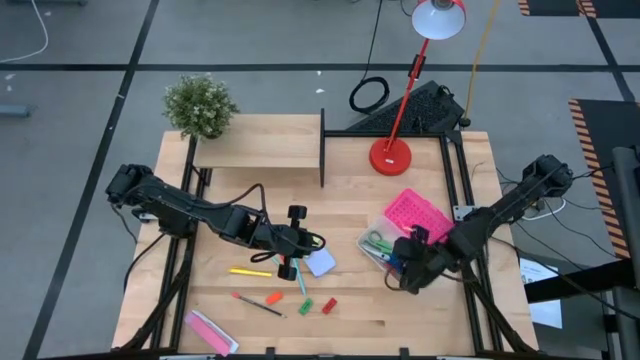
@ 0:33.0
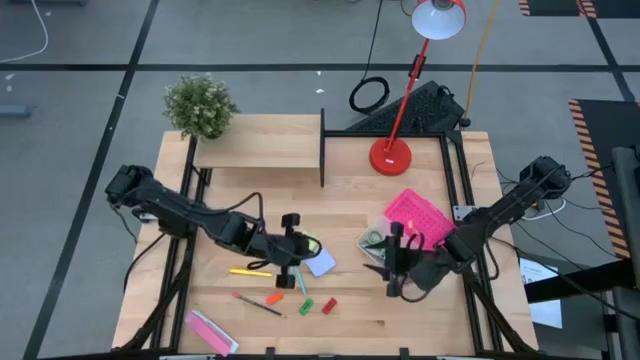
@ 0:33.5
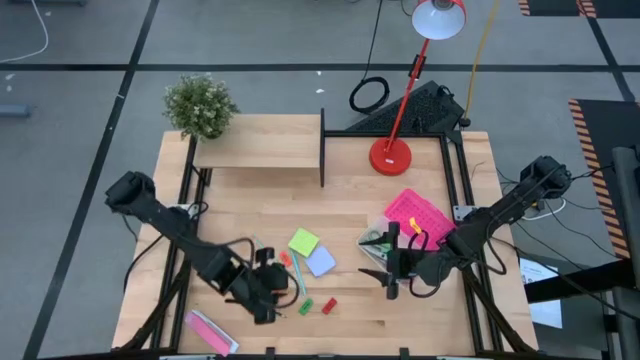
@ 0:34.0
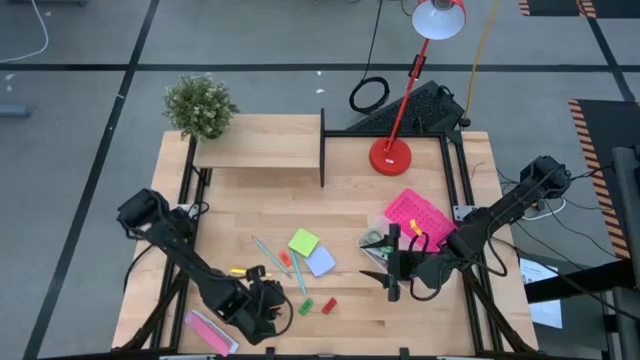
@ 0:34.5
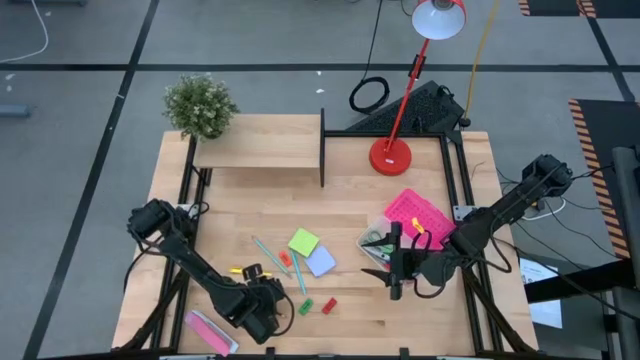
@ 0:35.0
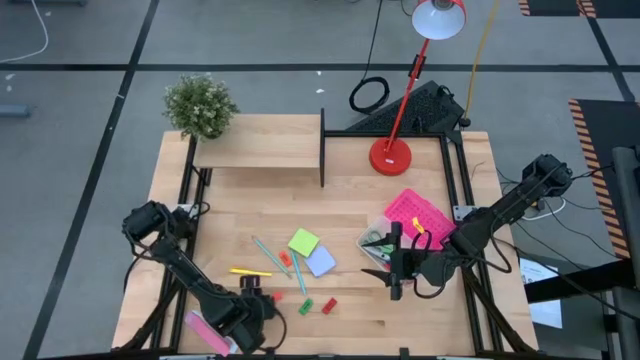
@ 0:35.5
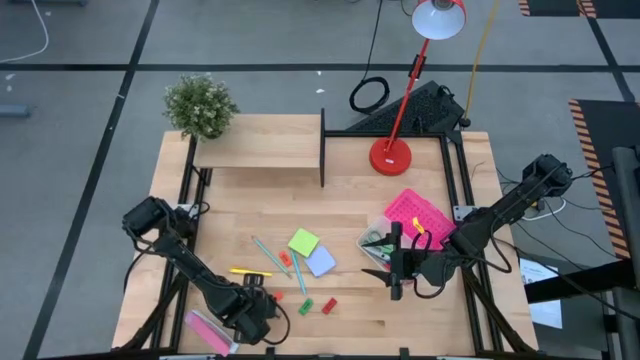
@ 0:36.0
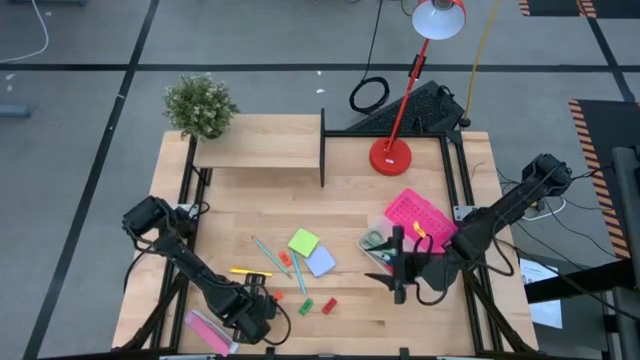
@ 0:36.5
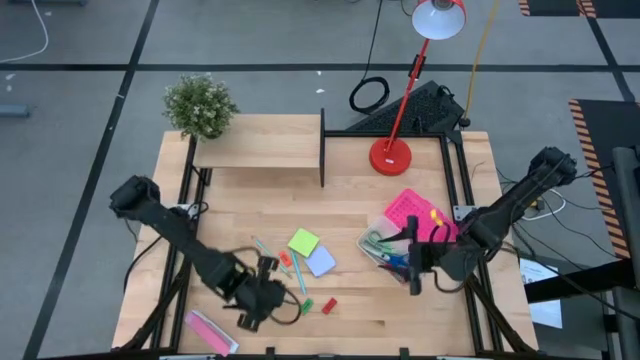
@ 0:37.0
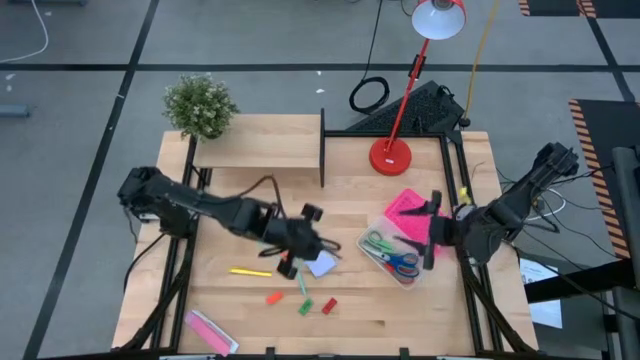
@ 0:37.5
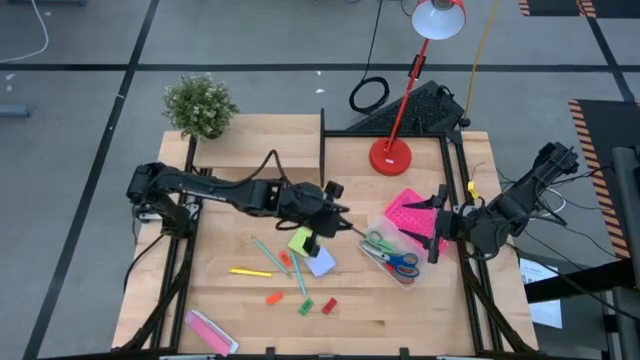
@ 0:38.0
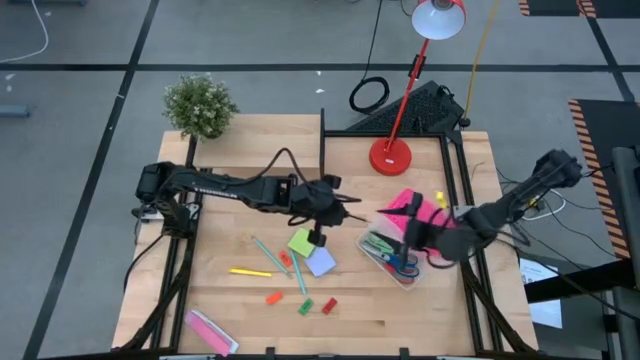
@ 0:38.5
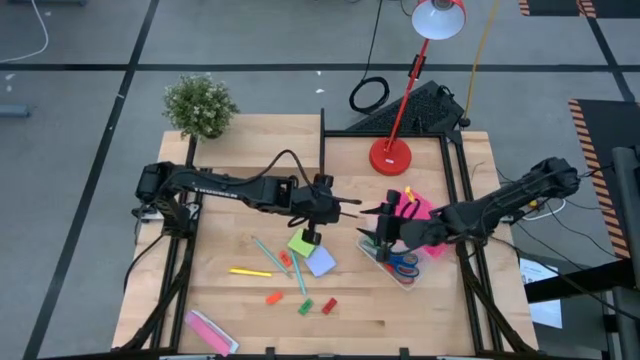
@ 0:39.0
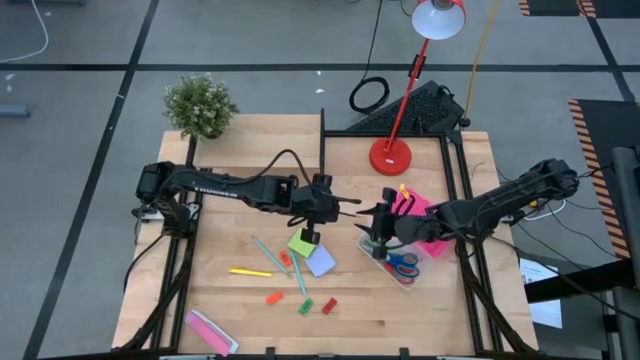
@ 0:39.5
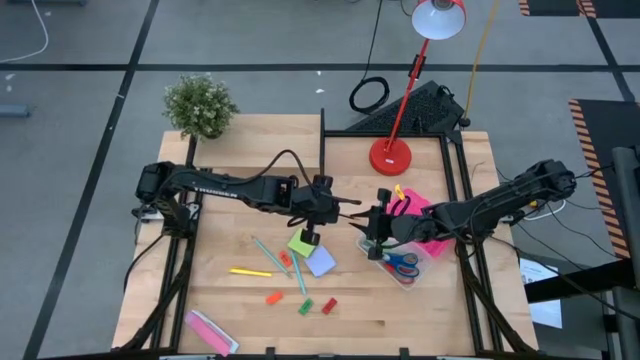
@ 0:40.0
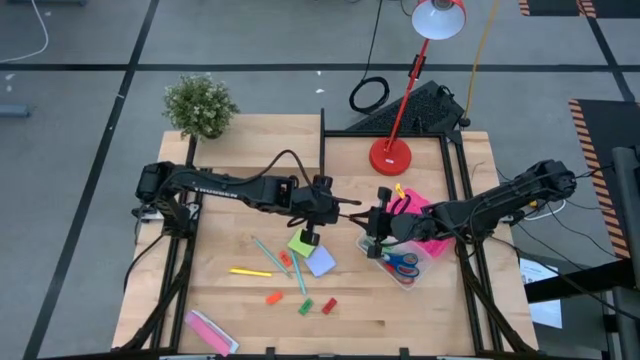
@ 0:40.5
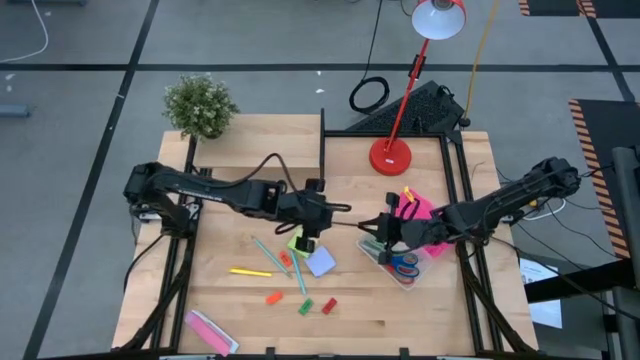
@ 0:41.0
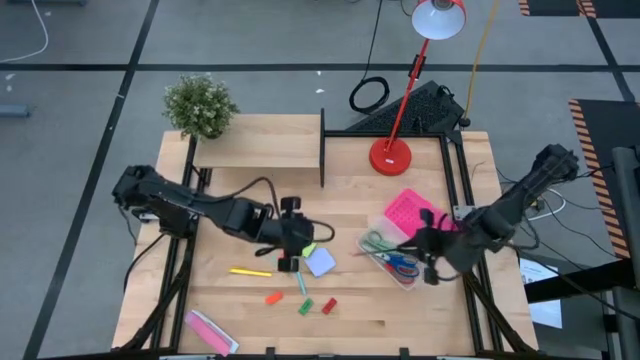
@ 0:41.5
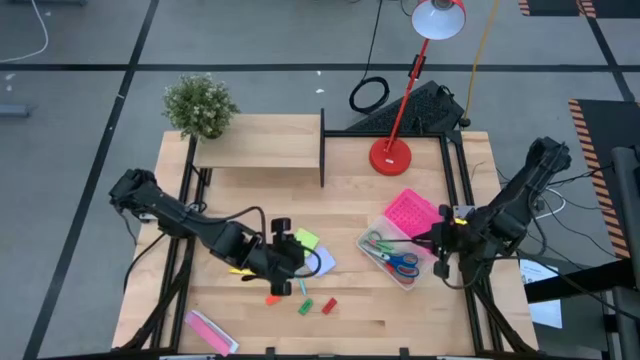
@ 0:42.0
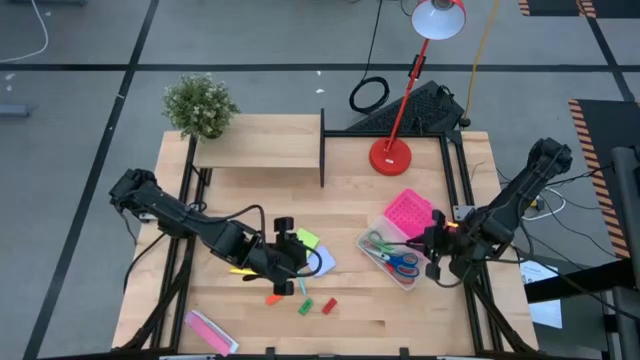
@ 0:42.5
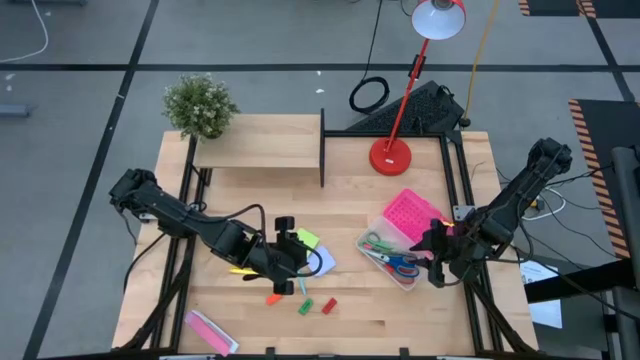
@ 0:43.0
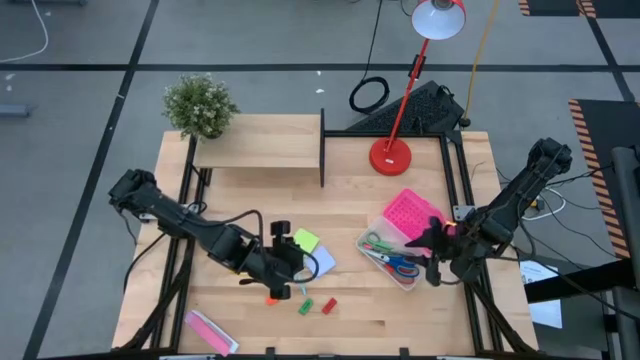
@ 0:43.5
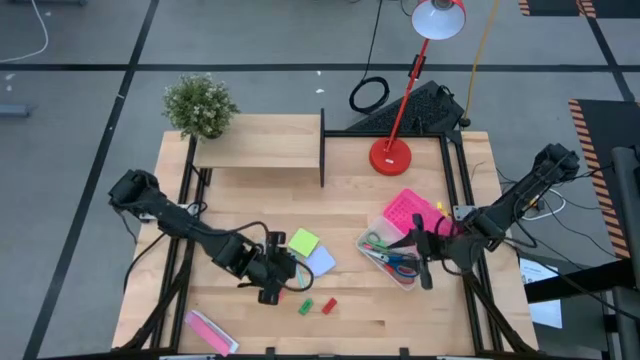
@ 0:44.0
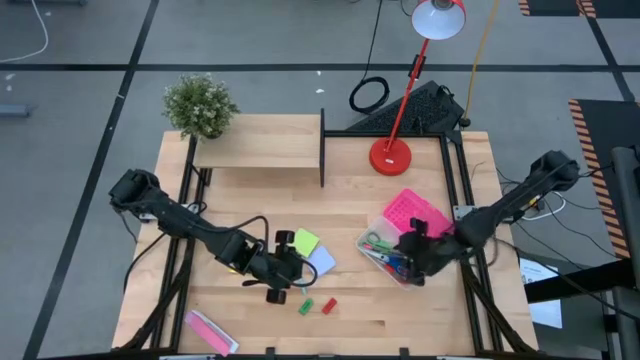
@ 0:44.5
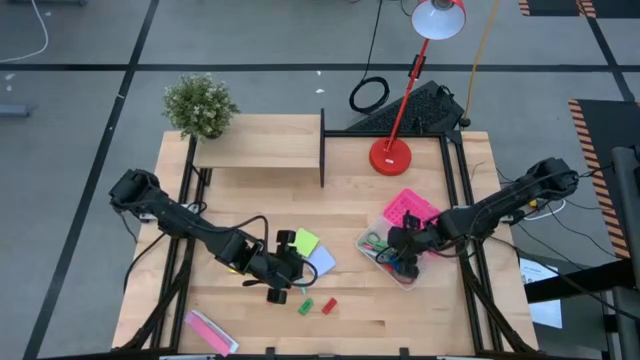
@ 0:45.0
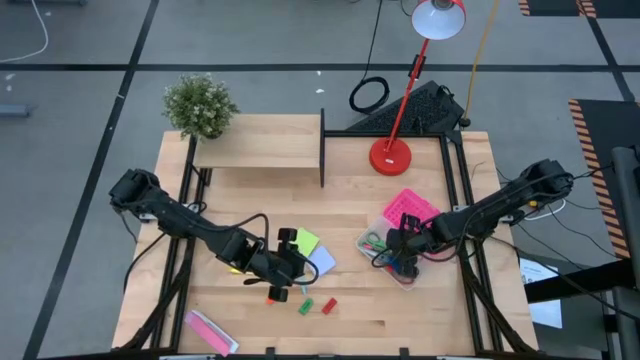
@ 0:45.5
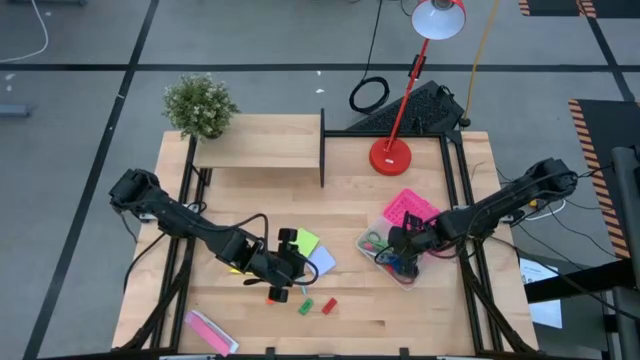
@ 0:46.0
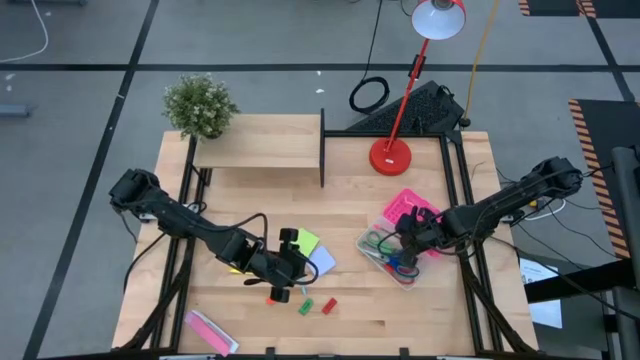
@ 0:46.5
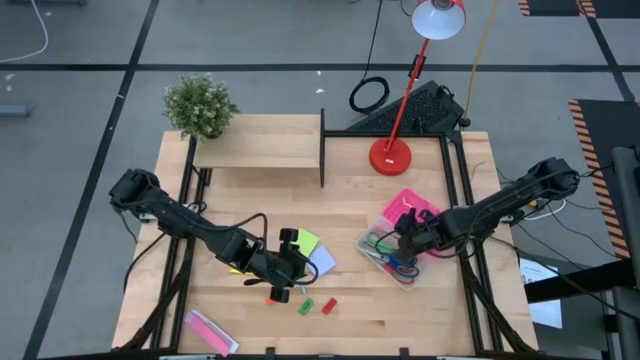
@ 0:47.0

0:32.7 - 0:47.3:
Task: Pack school essentials
Put the black pencil into the pink supply box

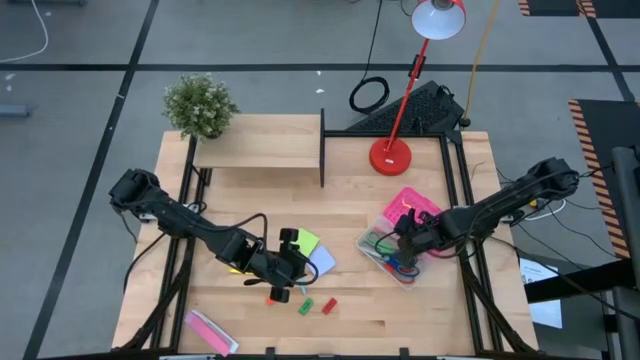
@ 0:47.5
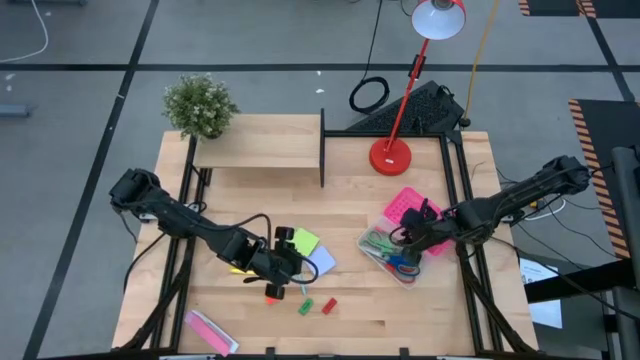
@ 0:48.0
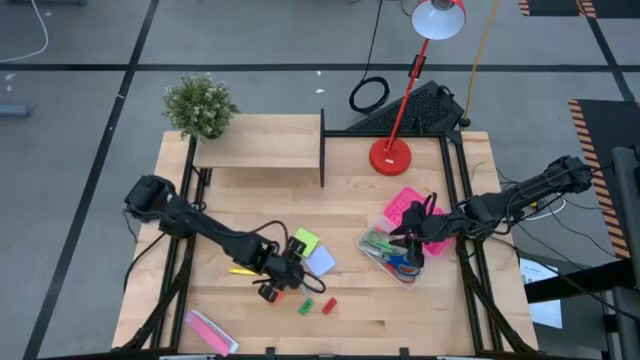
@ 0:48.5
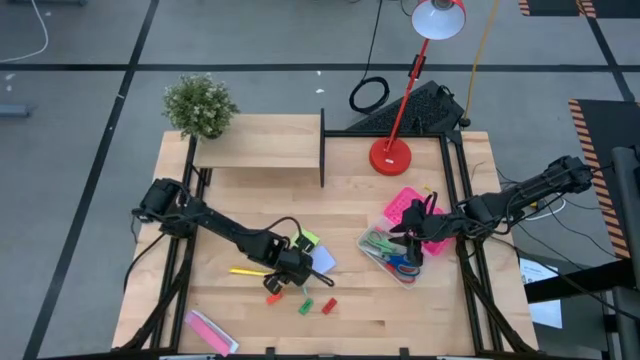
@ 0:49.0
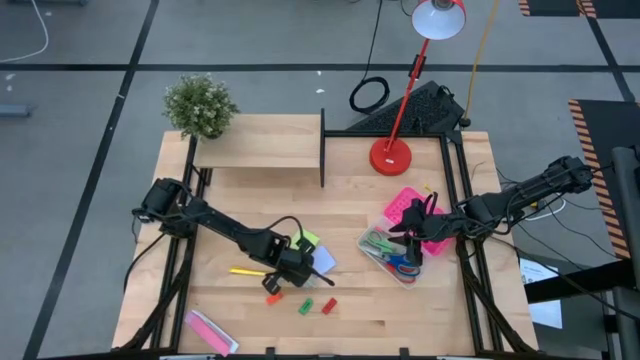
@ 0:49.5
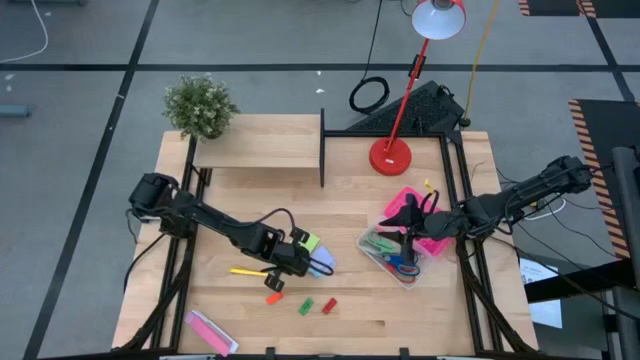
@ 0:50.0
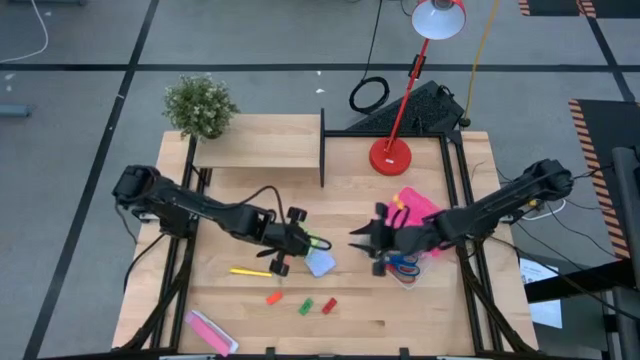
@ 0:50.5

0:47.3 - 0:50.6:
Put the blue pen into the pink supply box

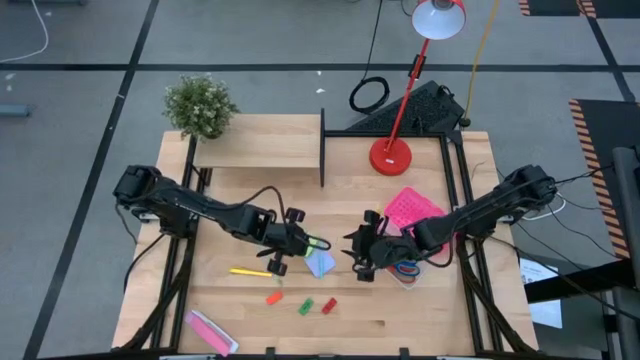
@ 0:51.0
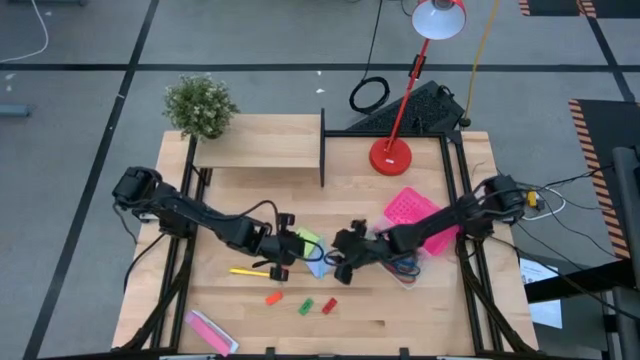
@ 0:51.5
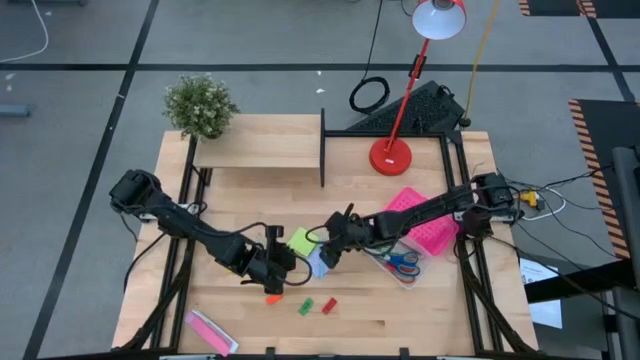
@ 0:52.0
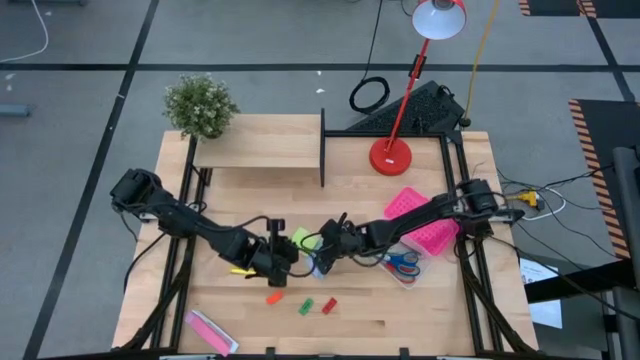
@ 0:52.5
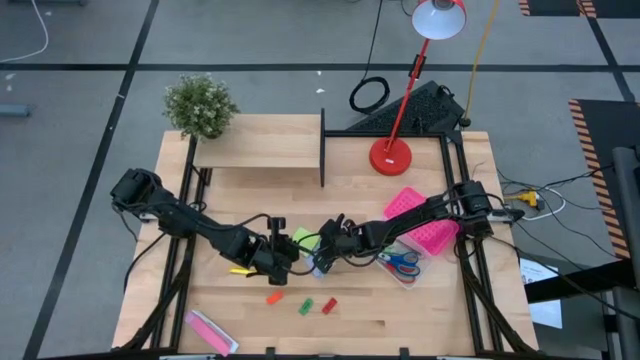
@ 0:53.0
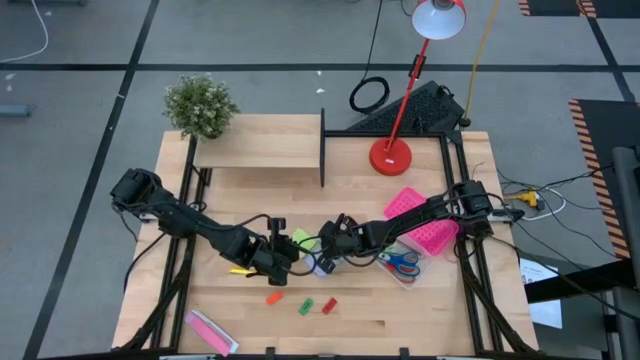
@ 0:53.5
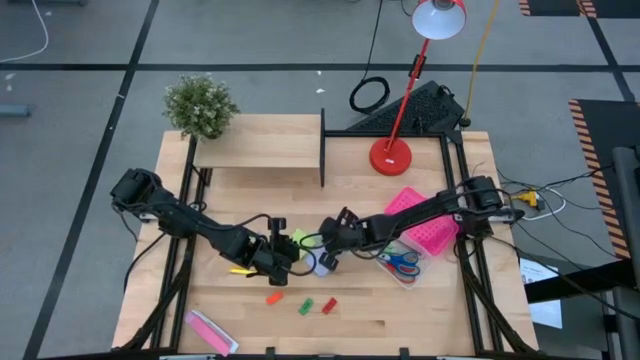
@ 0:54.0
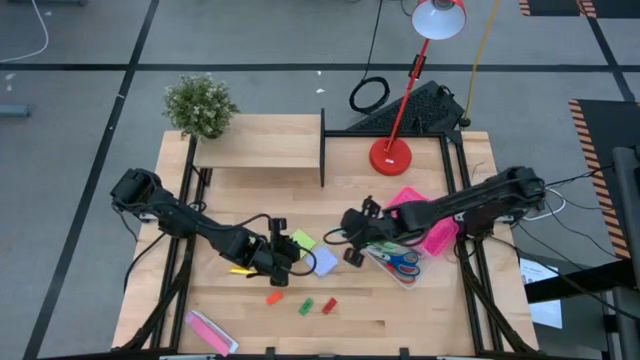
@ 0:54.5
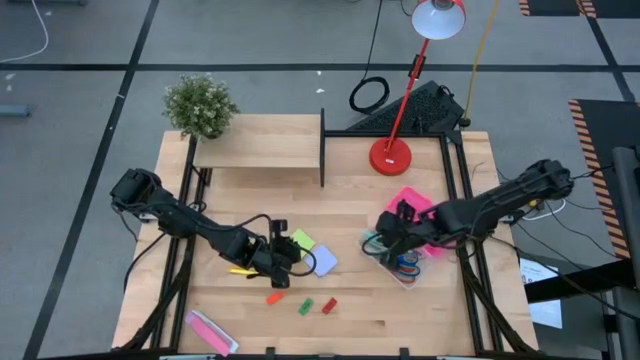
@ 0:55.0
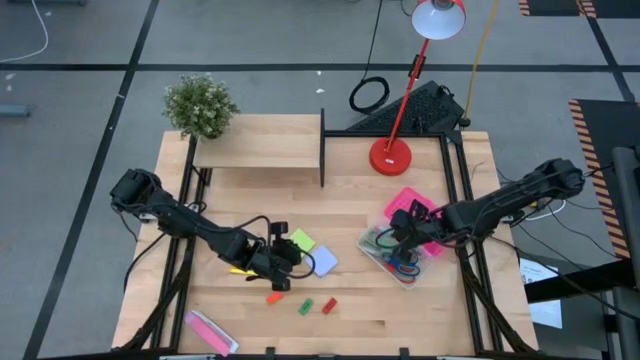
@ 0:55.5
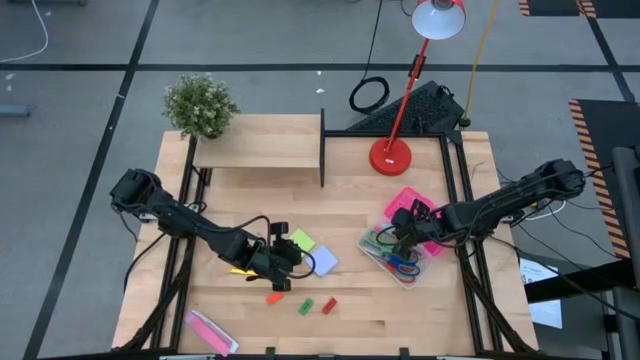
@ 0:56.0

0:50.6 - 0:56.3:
Put the blue pen into the pink supply box
